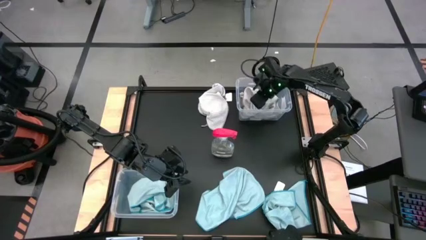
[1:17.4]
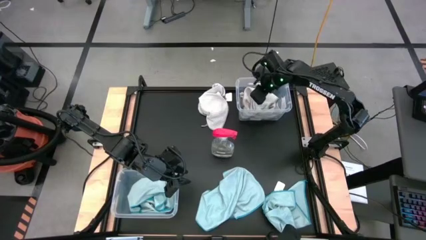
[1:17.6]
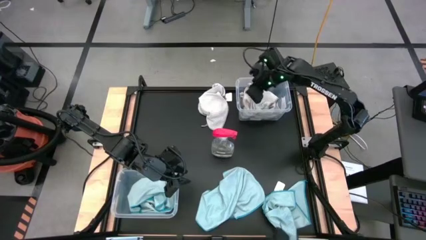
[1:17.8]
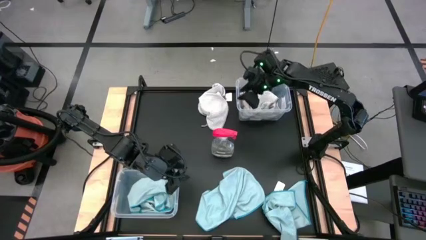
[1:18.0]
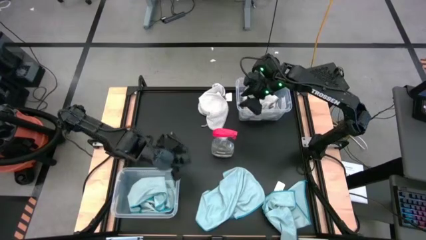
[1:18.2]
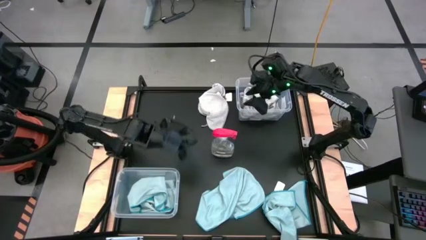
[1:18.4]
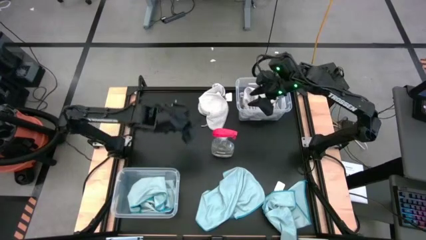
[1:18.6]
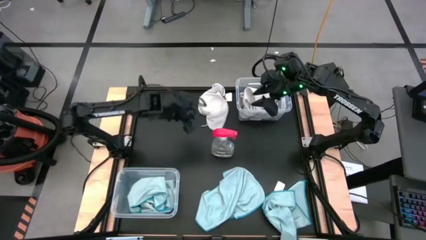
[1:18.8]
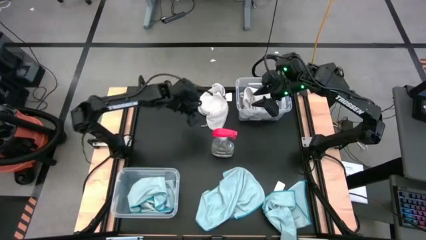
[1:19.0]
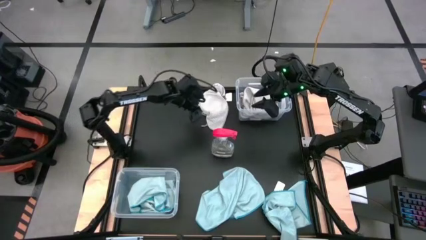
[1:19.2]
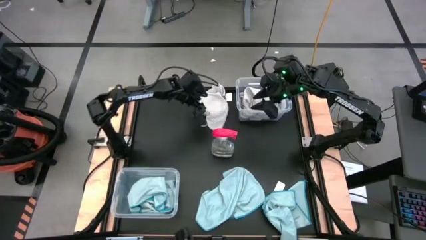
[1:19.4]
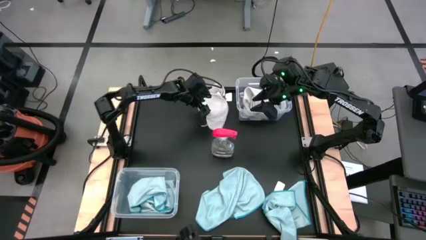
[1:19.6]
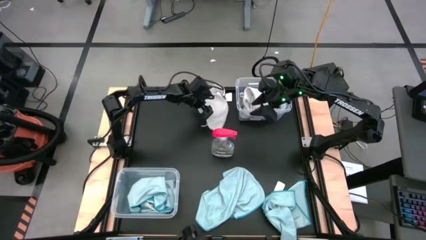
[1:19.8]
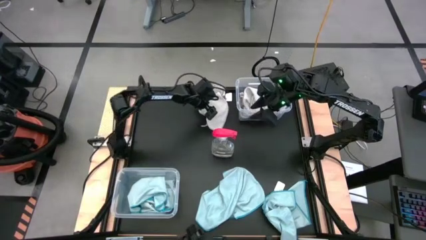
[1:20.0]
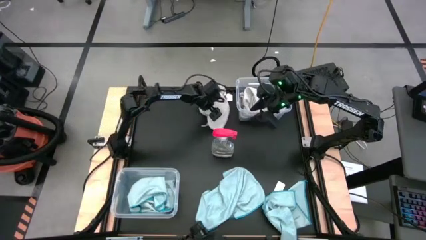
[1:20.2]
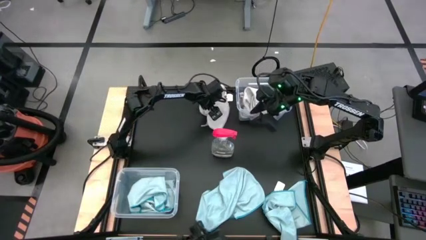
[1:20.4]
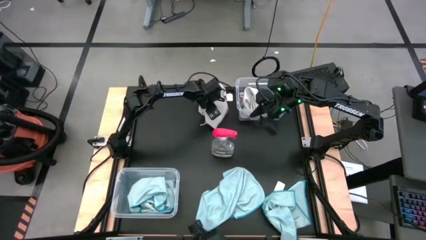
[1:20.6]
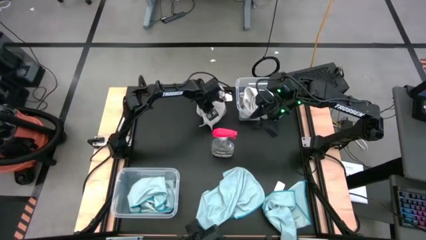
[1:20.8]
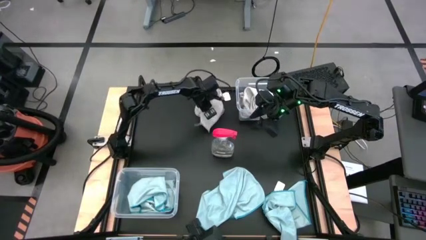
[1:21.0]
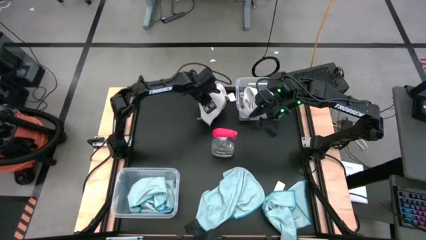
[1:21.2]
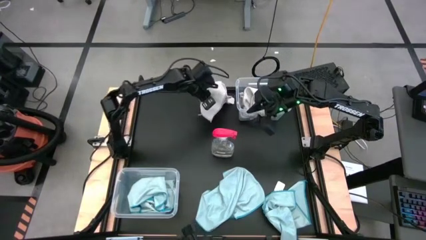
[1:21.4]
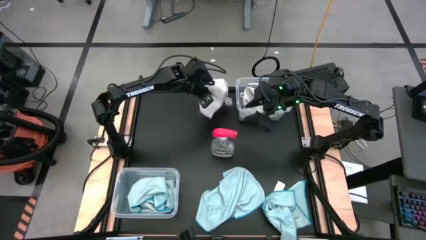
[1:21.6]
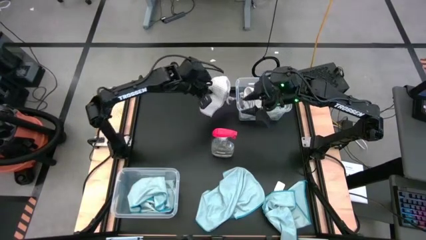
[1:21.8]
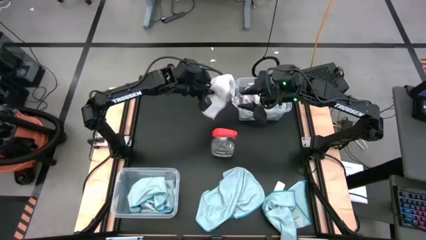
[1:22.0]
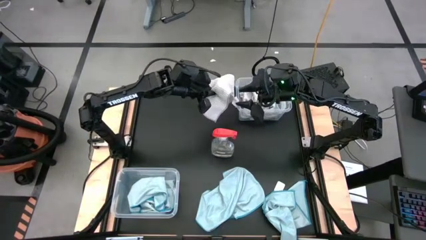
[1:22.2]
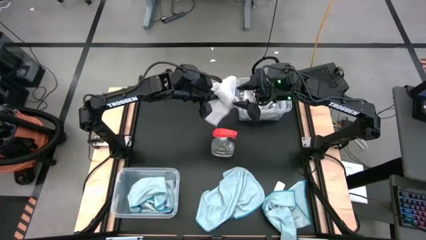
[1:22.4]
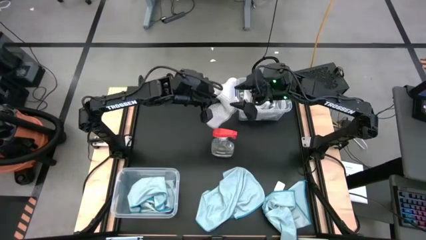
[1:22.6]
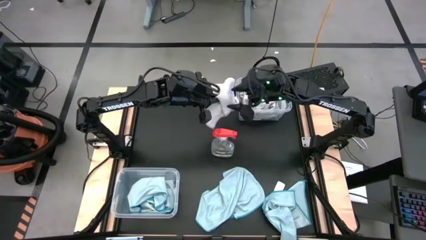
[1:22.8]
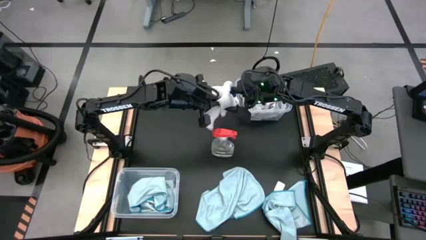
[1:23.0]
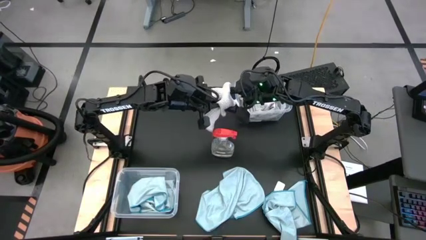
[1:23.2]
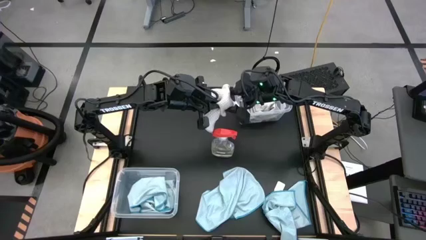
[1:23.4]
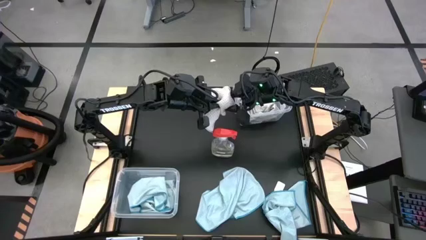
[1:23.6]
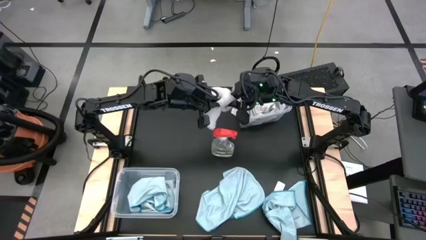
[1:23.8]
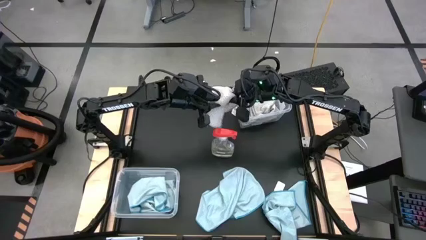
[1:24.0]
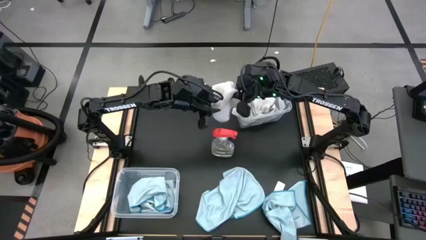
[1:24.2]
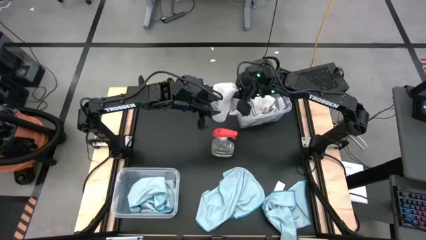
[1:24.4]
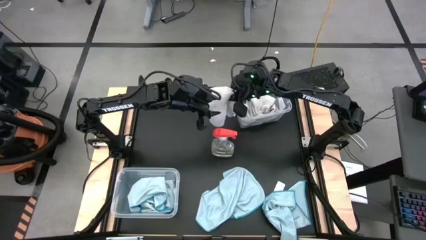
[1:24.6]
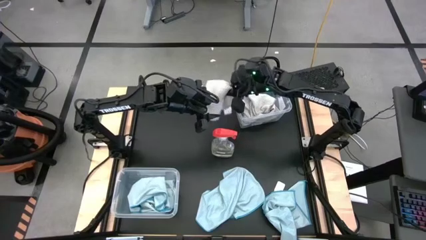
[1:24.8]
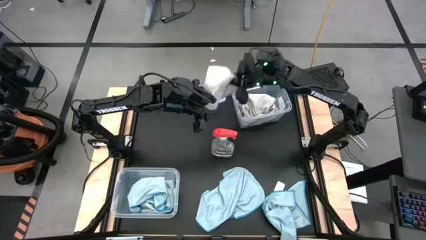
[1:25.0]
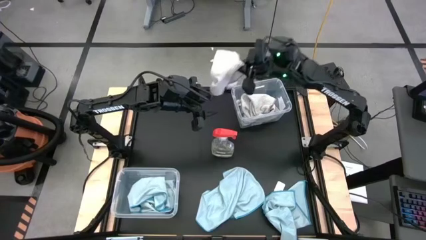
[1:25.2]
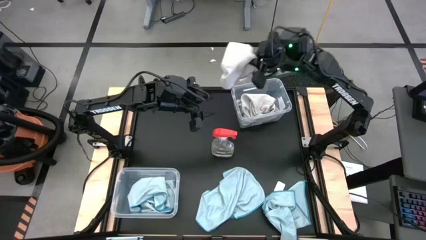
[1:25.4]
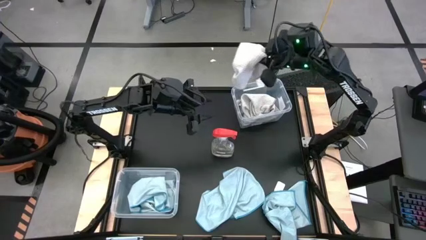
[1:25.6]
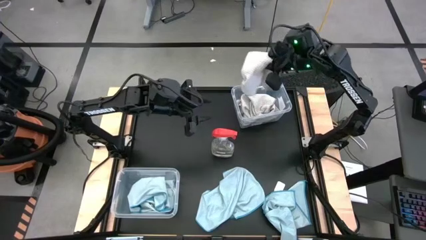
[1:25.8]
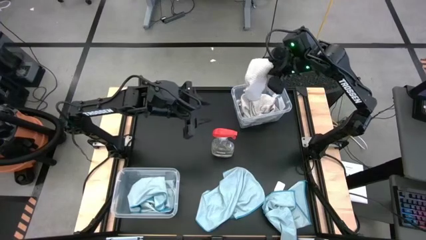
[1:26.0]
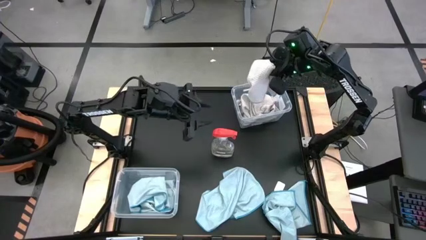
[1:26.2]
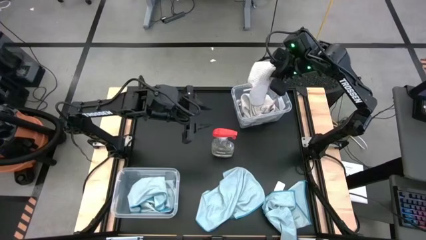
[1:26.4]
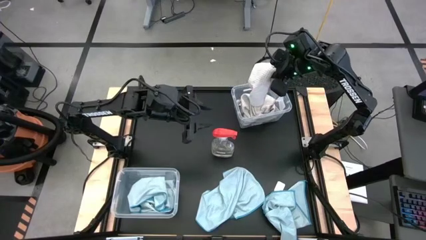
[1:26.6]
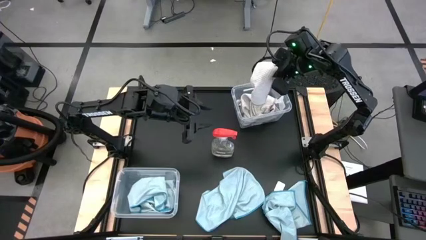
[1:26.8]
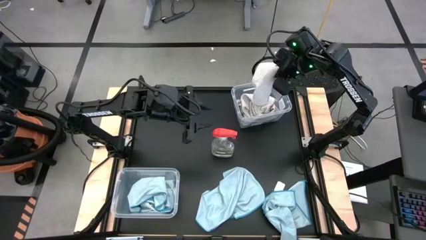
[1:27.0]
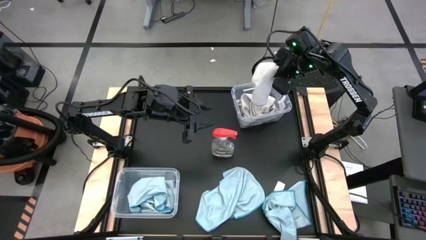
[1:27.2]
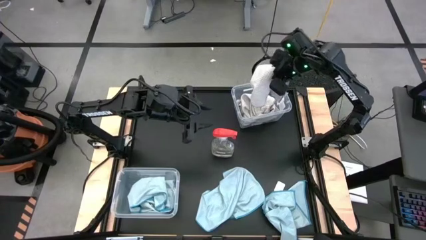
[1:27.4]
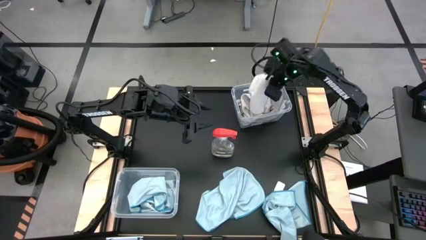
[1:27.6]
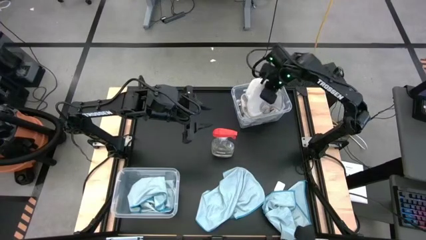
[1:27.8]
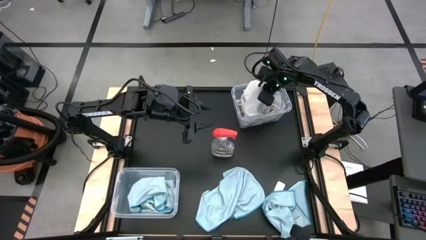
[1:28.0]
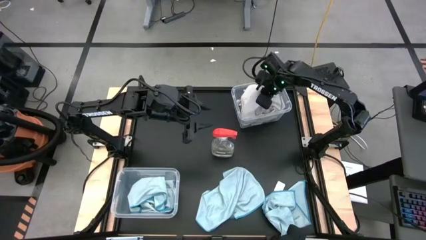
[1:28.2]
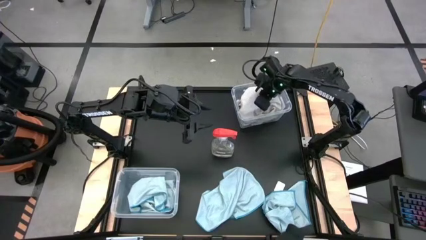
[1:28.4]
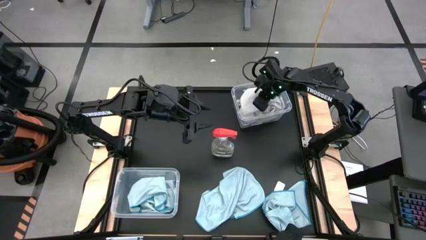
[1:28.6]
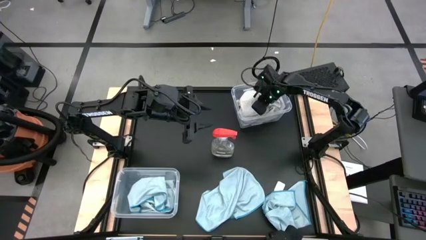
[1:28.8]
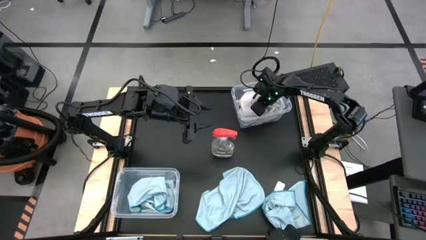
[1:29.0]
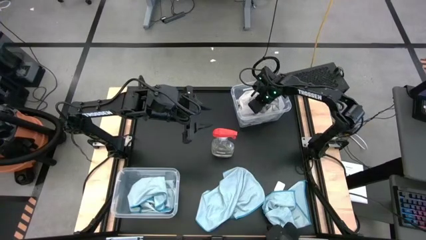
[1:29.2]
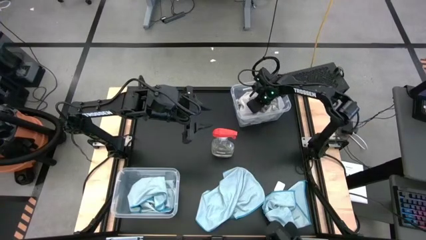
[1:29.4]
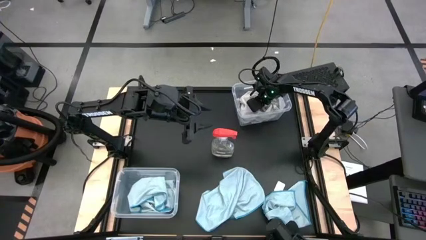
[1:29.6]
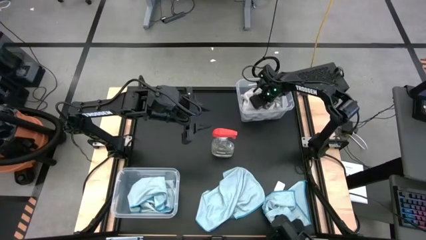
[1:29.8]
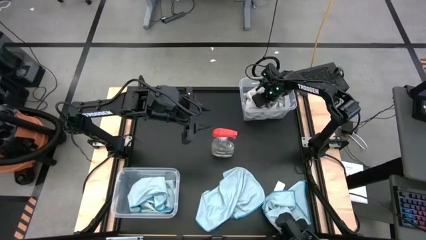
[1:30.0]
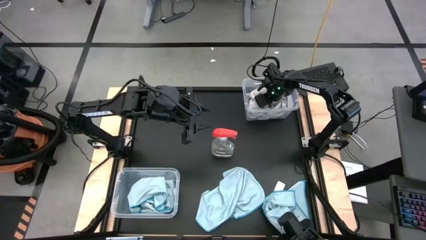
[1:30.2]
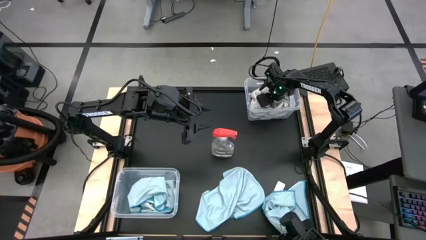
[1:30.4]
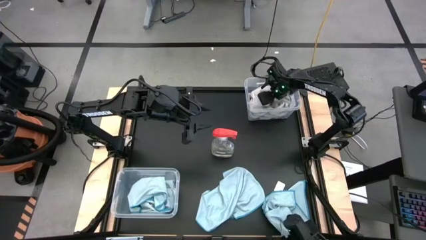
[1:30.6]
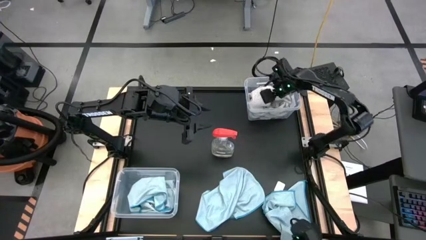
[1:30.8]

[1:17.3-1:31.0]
Task: Sort microfiber towel by color & place in baskets
Put the gray towel into the top transparent bin

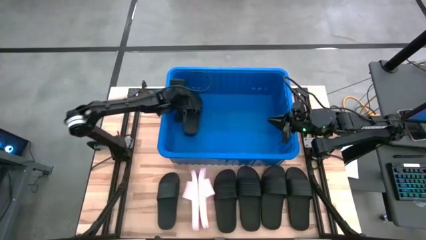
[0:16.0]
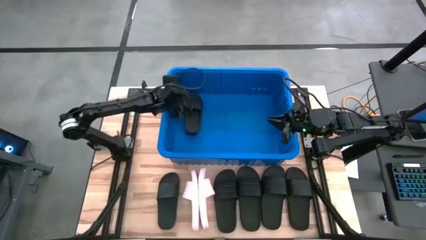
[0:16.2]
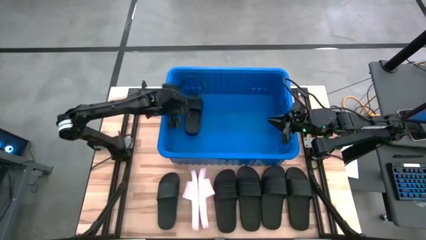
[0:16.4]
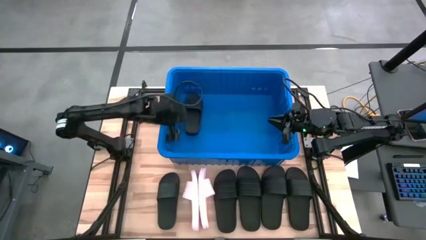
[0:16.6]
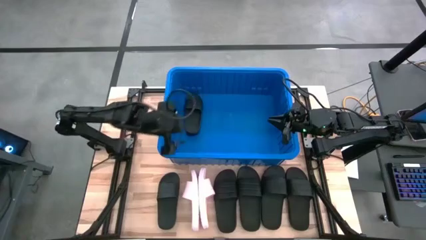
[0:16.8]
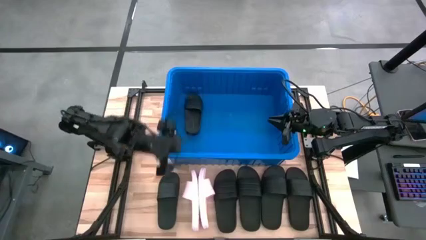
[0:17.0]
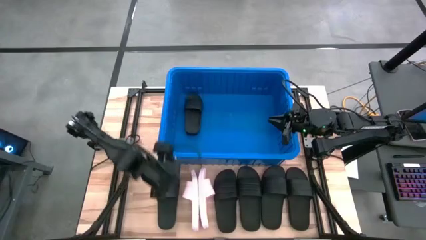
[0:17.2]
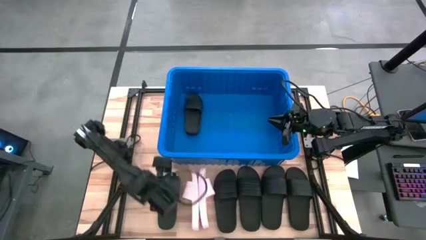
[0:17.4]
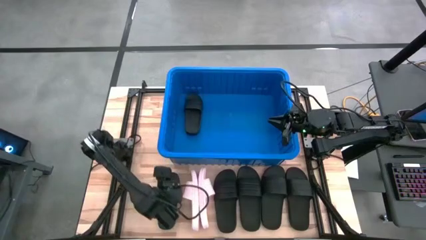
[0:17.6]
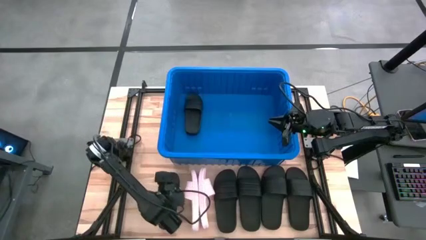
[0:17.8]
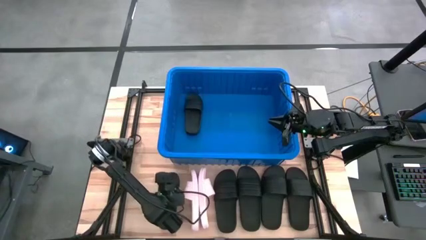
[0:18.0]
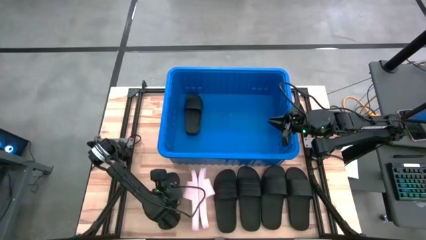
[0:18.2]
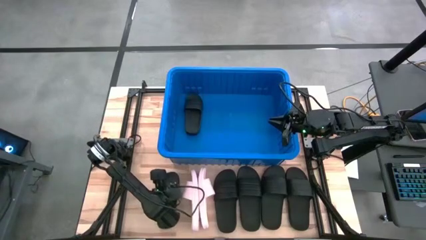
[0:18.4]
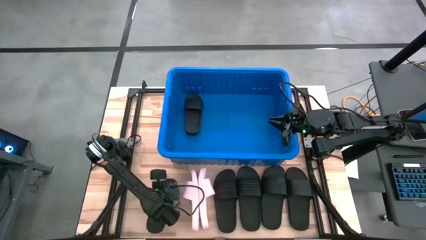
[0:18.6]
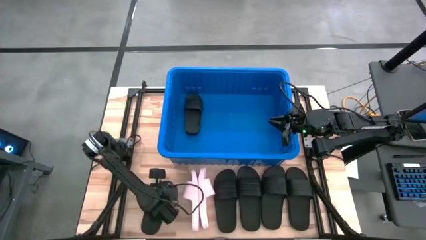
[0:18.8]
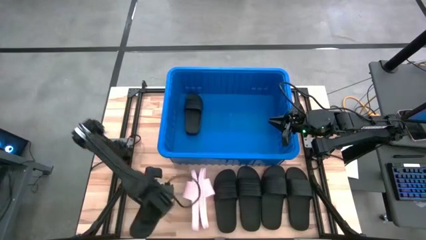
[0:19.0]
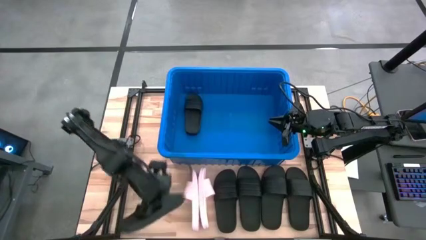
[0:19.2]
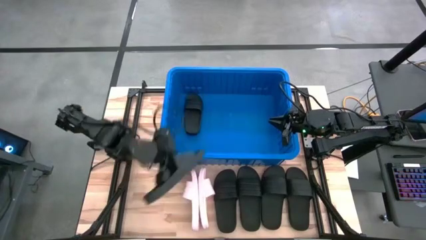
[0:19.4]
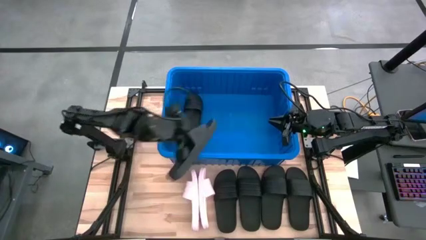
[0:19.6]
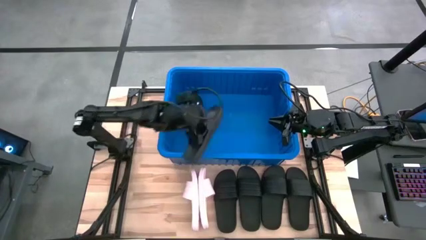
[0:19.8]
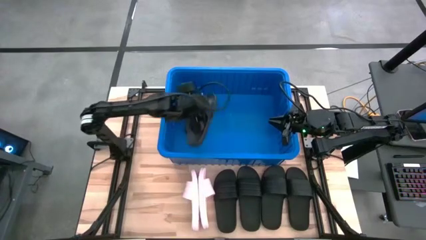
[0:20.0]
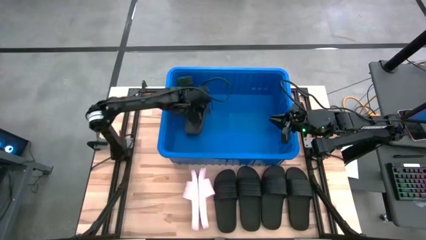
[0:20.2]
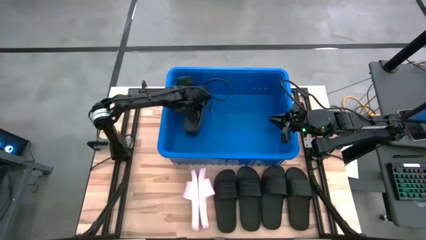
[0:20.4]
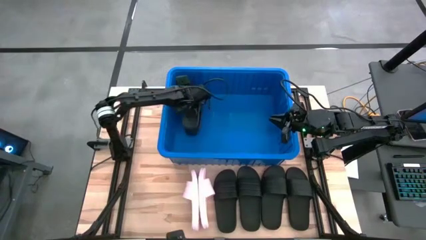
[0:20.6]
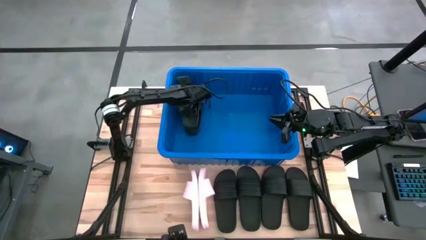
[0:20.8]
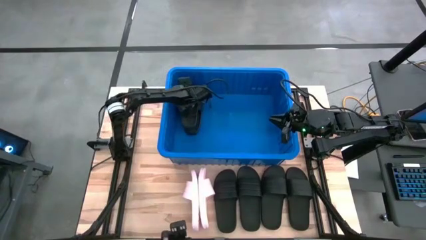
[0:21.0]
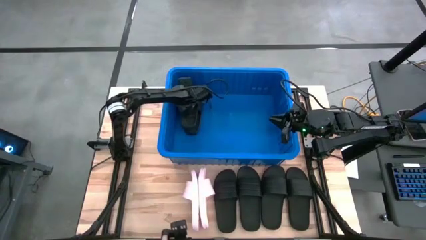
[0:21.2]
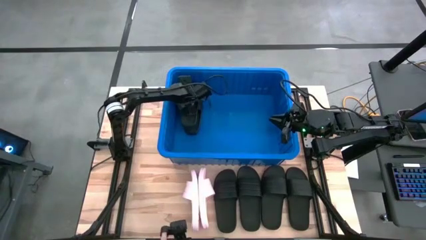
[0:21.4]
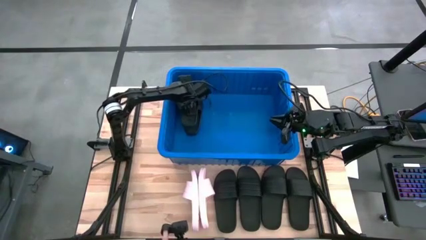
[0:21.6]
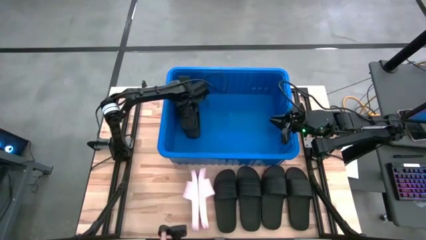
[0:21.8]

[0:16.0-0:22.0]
Task: Pick and place slides into bin
Put the black slide into the blue container
